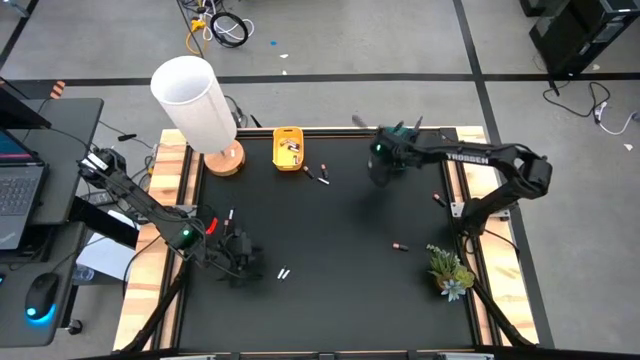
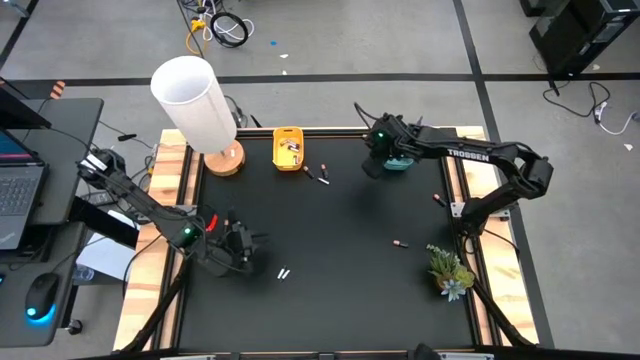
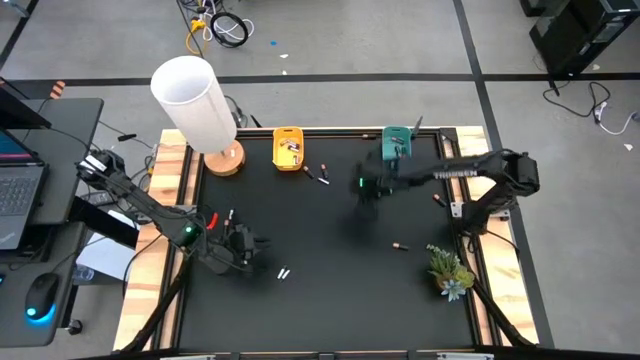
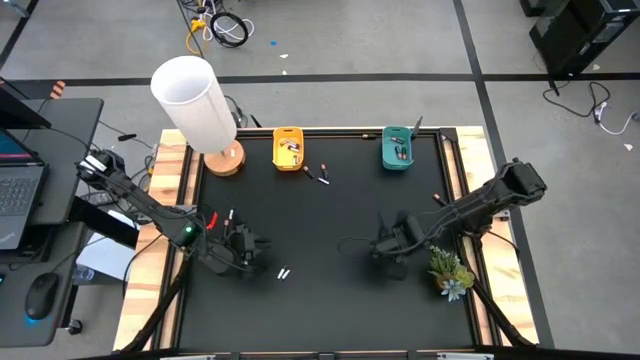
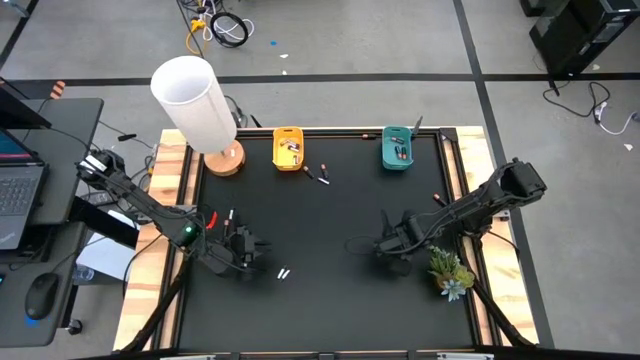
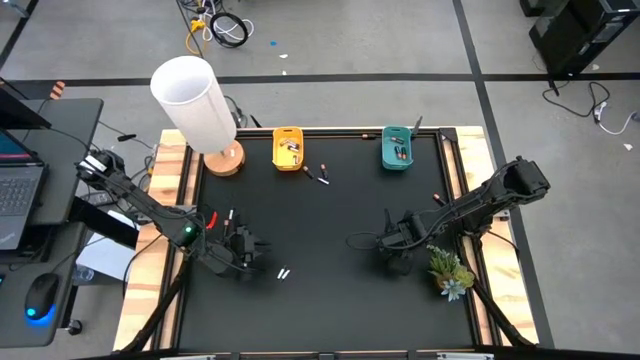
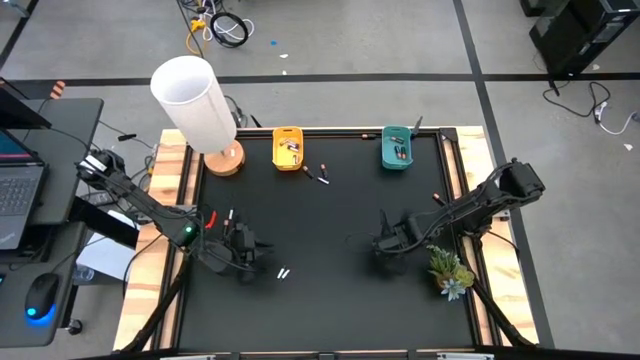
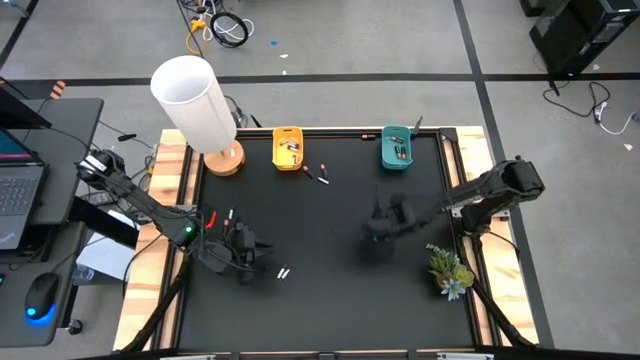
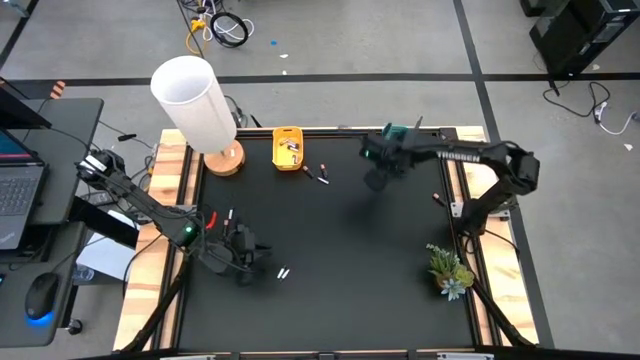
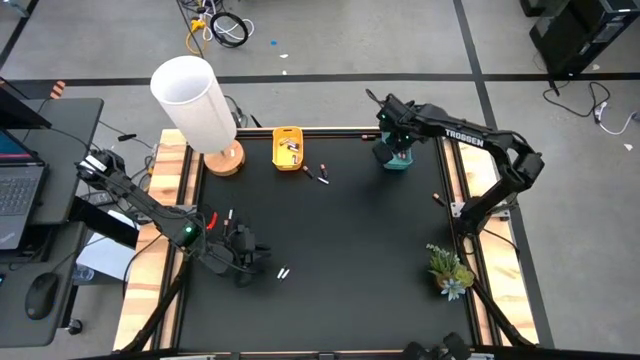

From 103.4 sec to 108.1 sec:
Task: Sort batteries
Put the black battery into the blue bin

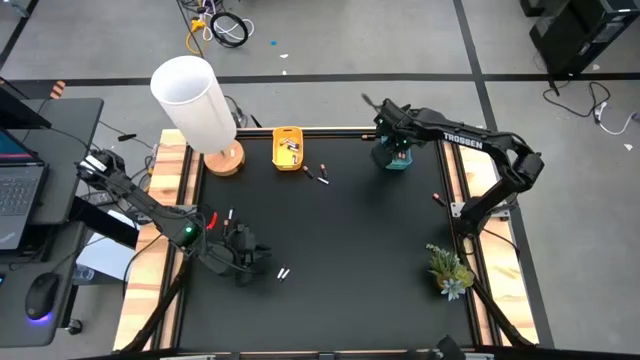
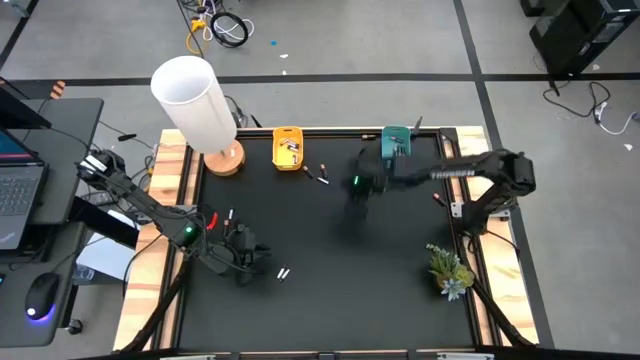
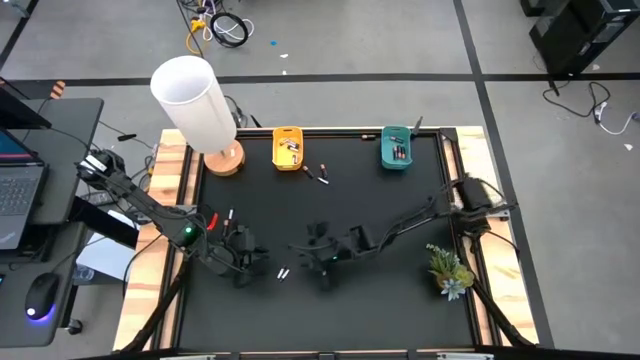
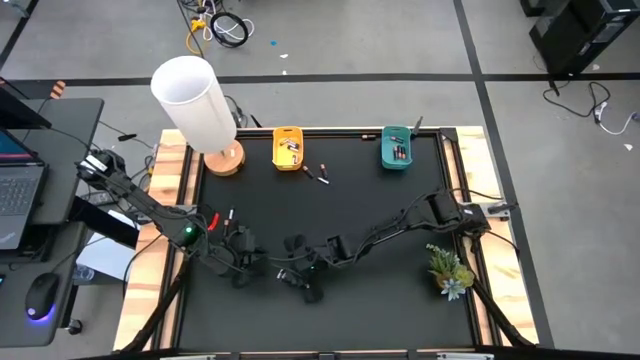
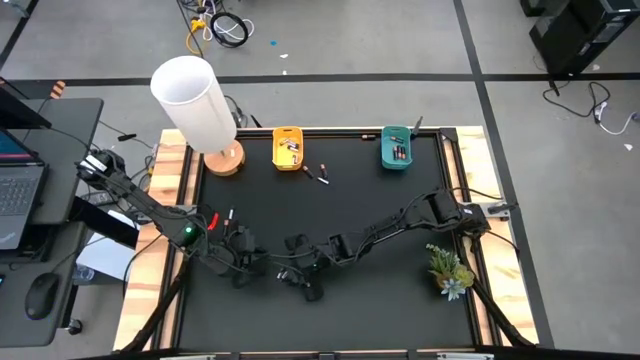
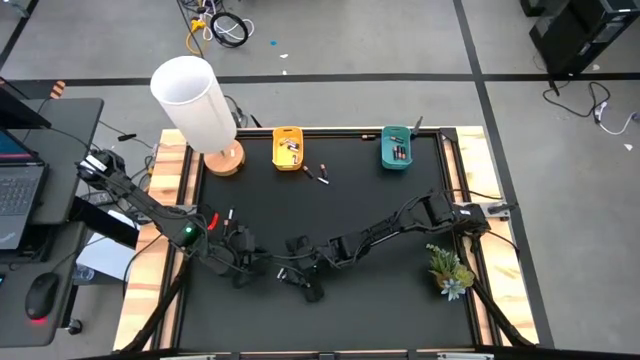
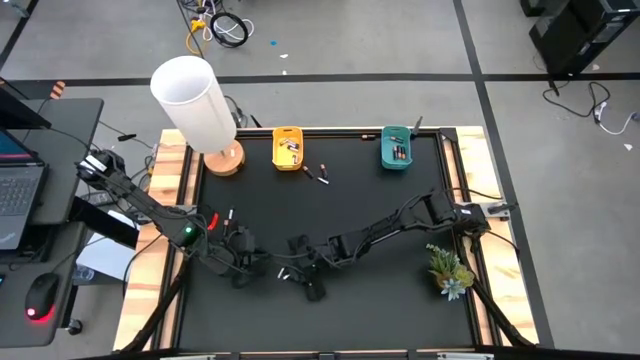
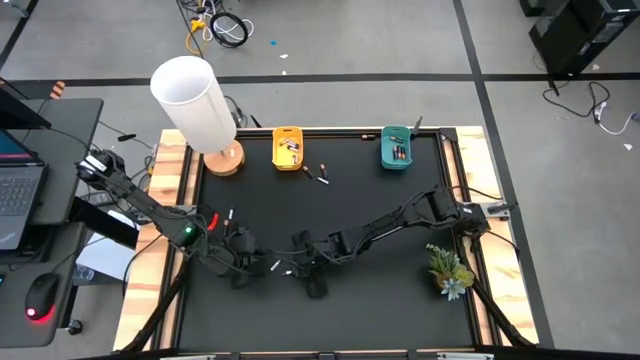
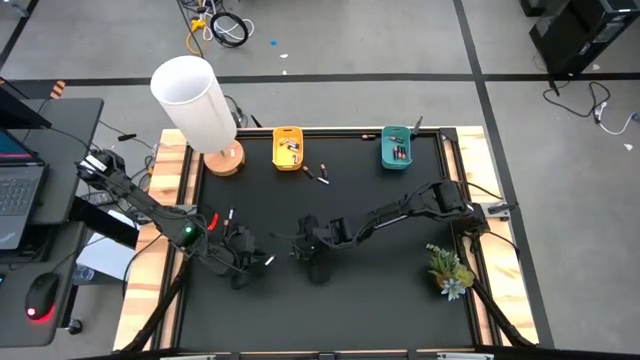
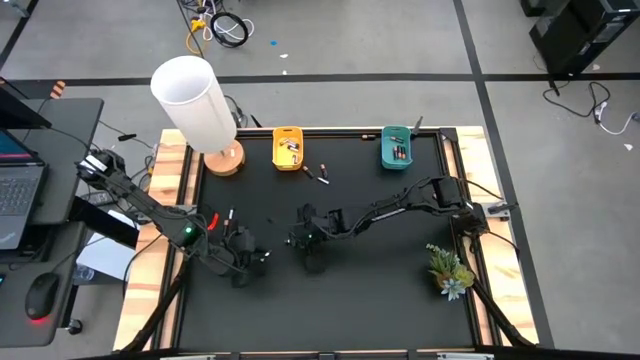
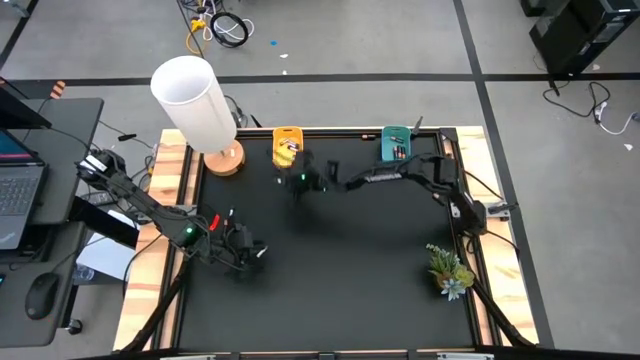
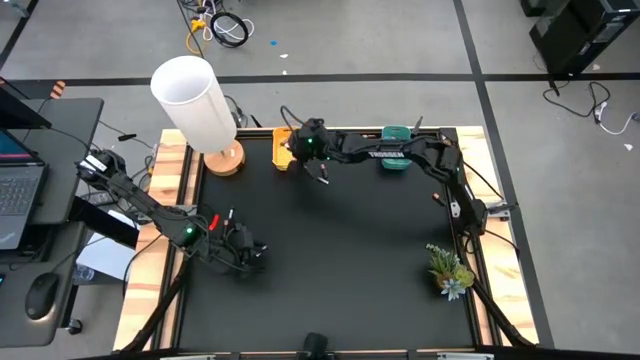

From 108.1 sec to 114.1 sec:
Put the silver battery into the yellow bin

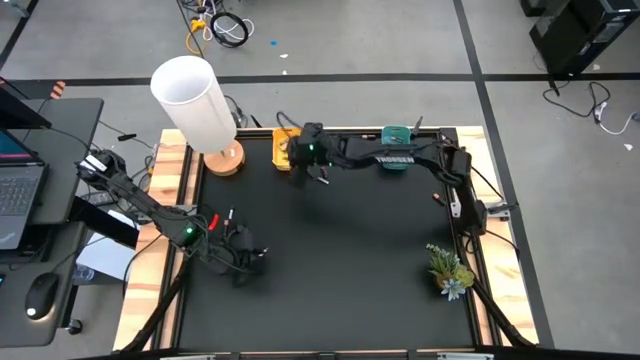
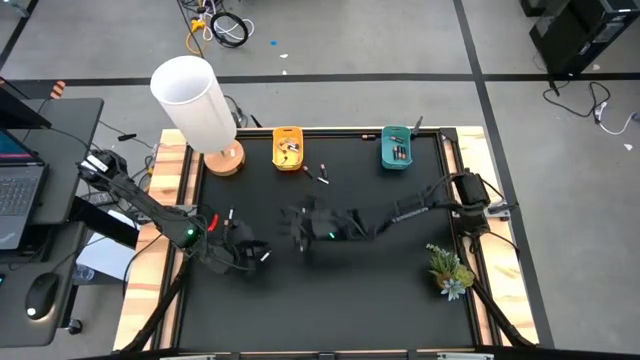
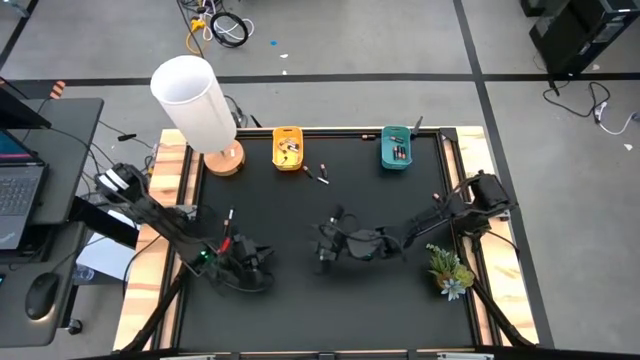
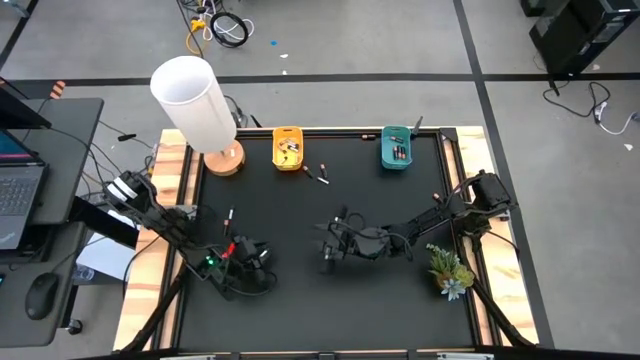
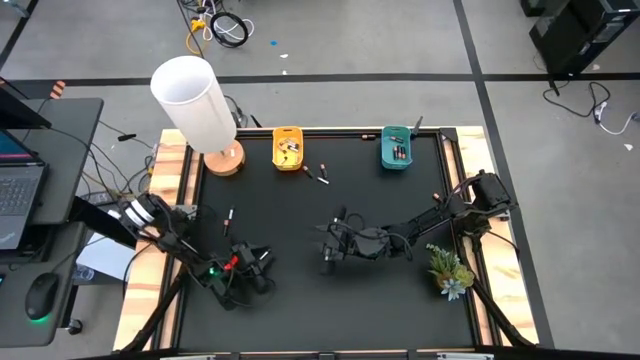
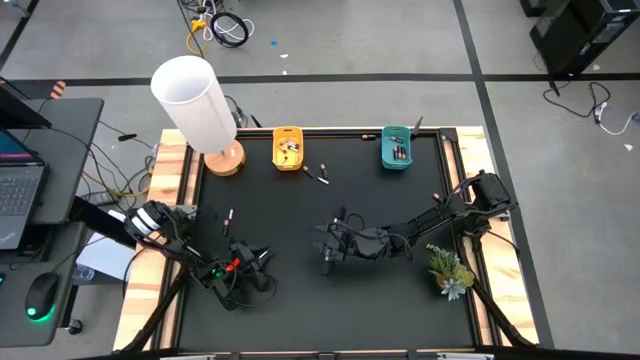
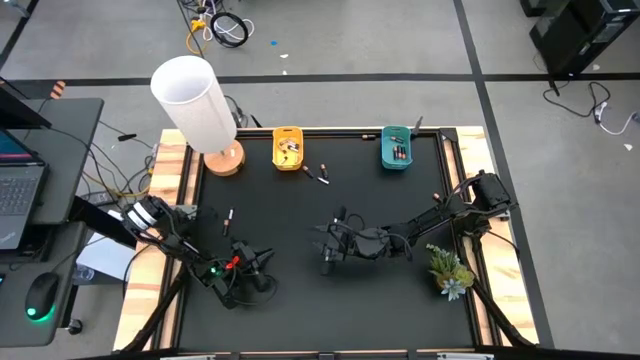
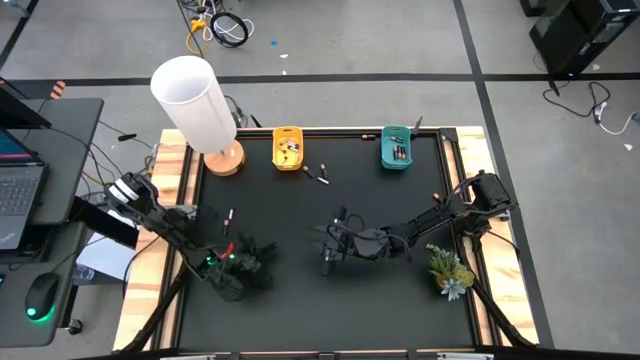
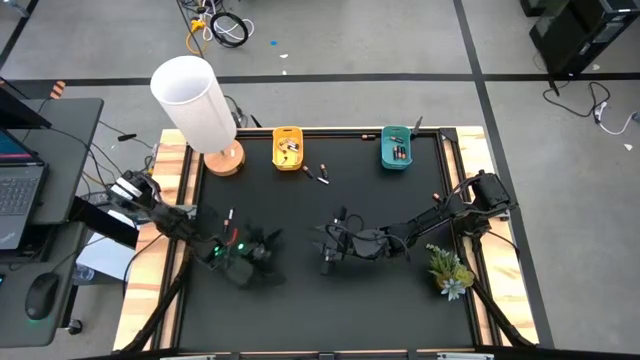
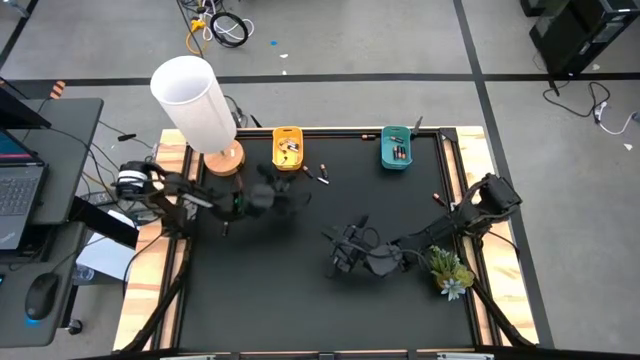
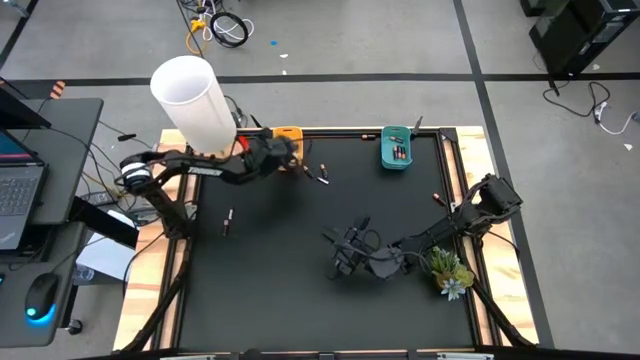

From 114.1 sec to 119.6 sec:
Put the silver battery into the yellow bin

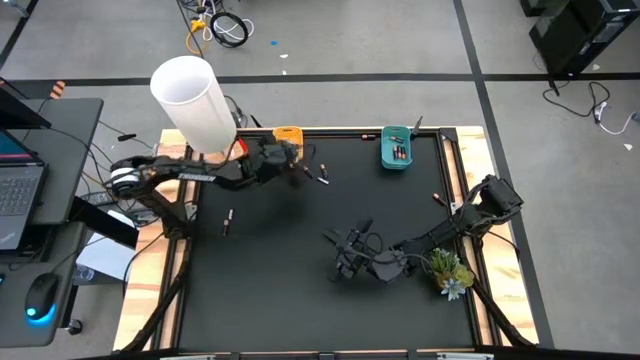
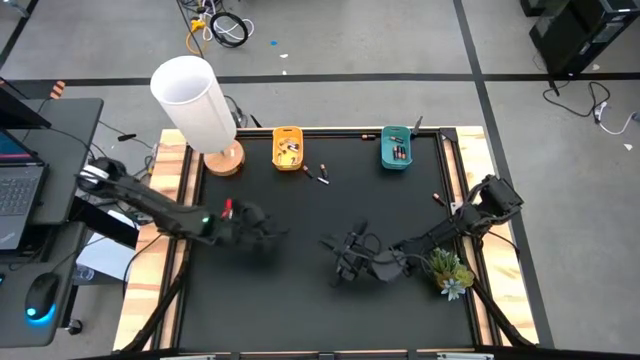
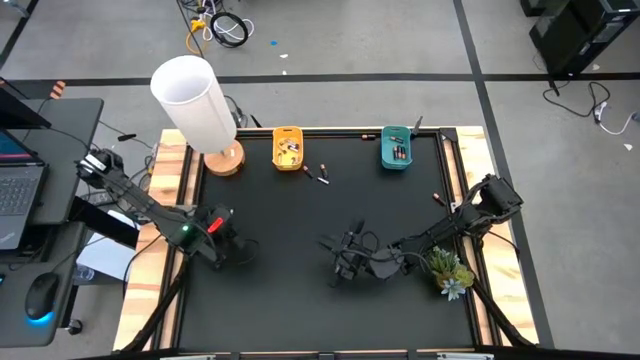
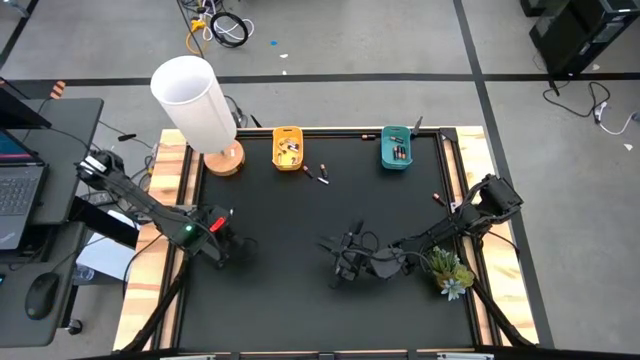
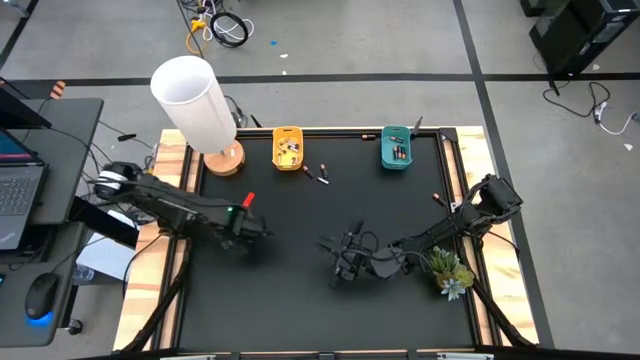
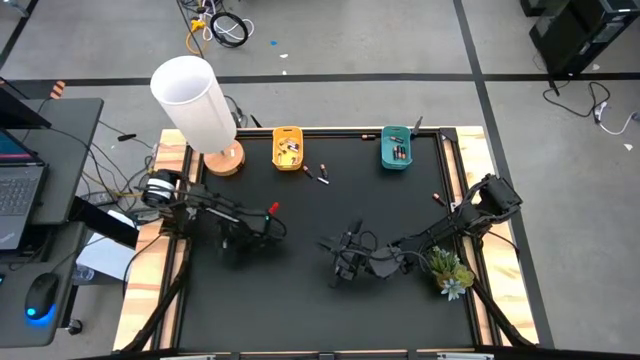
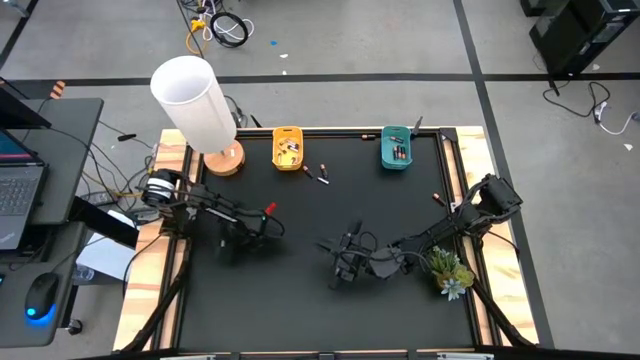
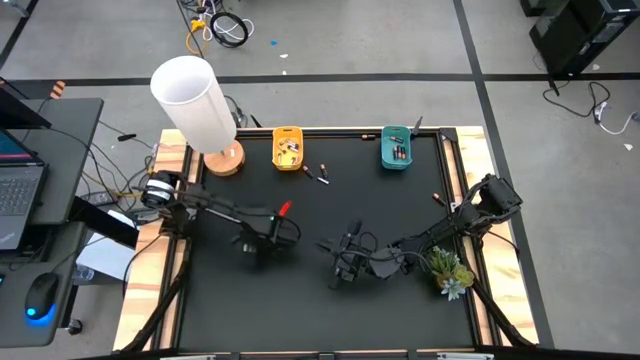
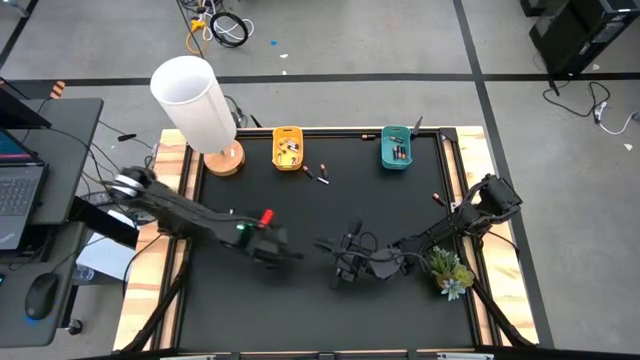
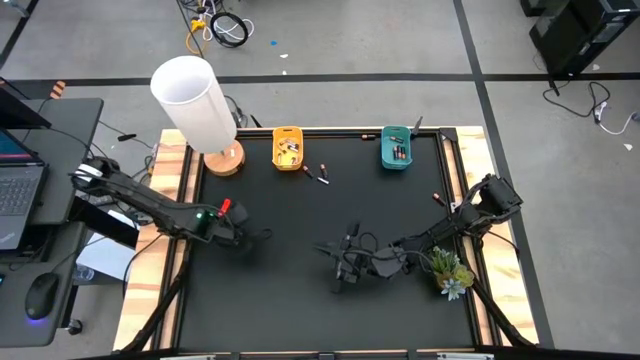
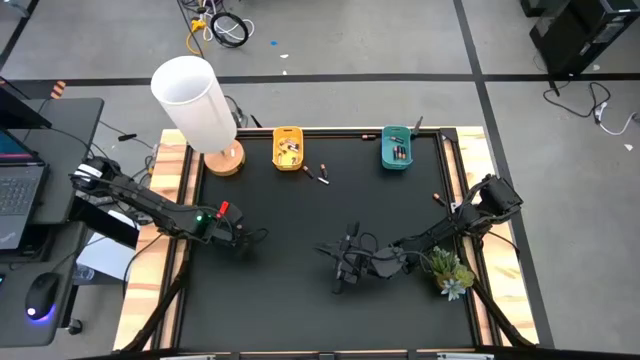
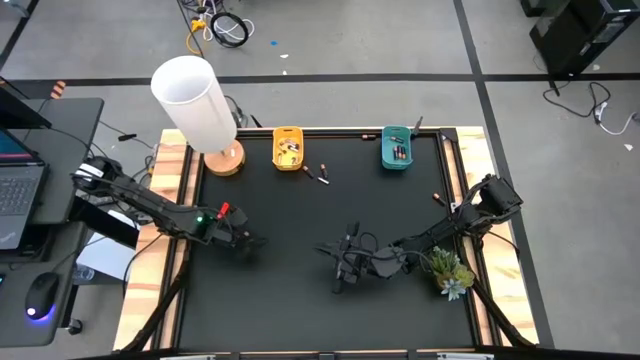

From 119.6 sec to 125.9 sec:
Put the black battery into the blue bin
